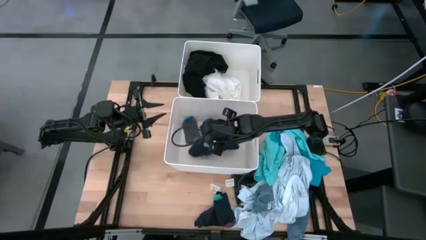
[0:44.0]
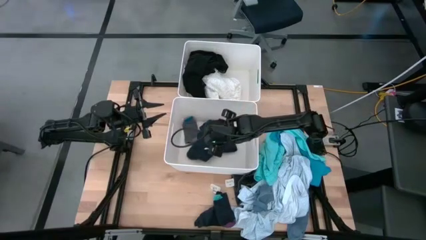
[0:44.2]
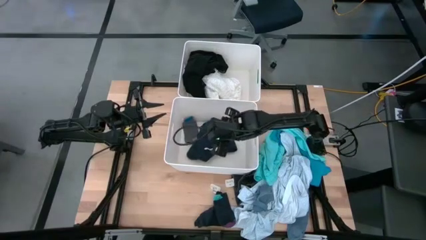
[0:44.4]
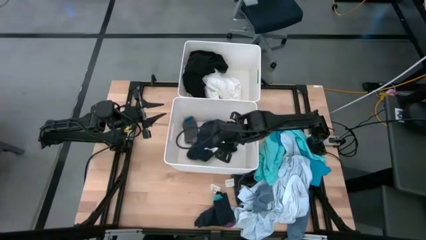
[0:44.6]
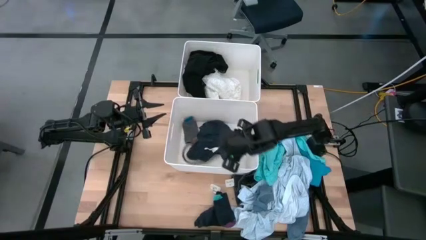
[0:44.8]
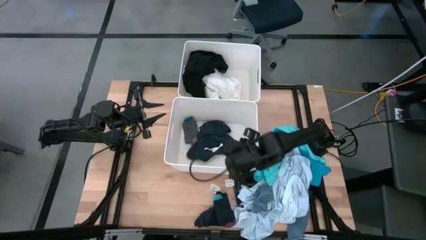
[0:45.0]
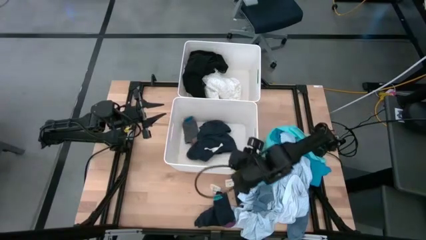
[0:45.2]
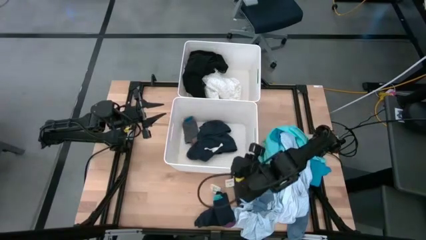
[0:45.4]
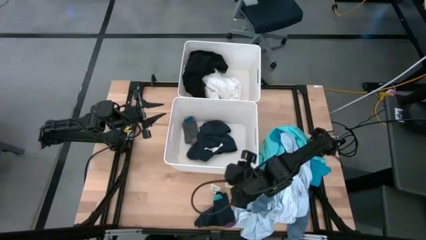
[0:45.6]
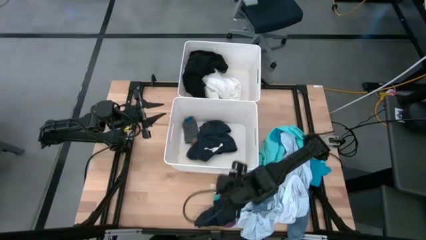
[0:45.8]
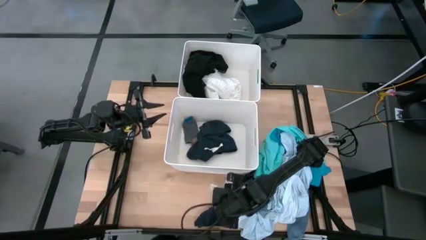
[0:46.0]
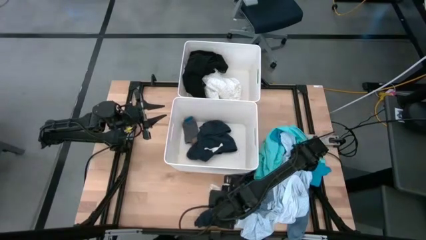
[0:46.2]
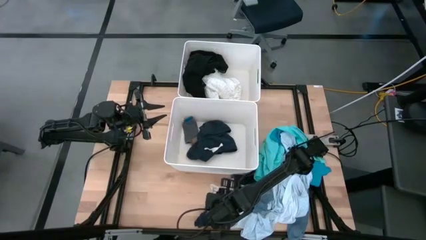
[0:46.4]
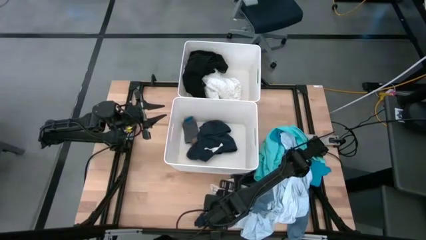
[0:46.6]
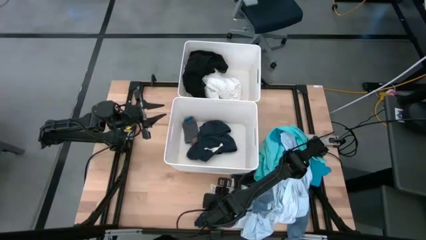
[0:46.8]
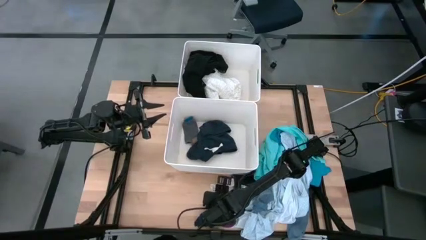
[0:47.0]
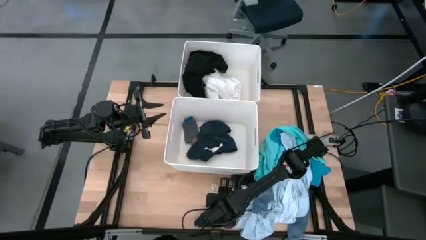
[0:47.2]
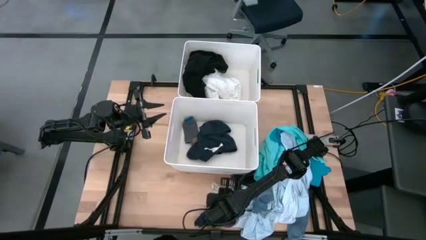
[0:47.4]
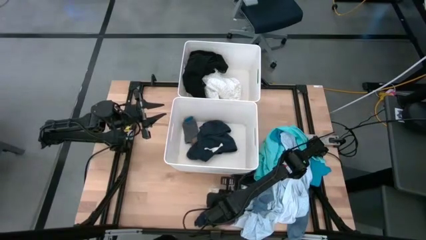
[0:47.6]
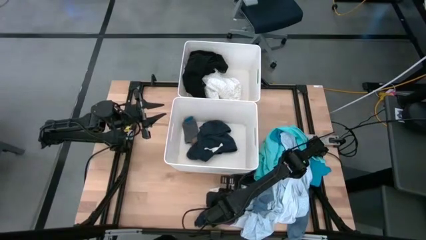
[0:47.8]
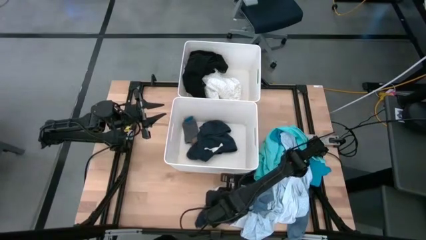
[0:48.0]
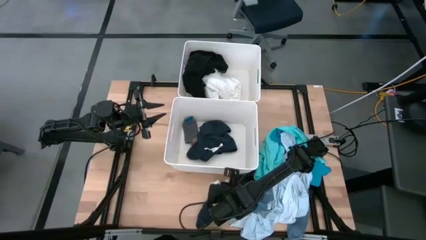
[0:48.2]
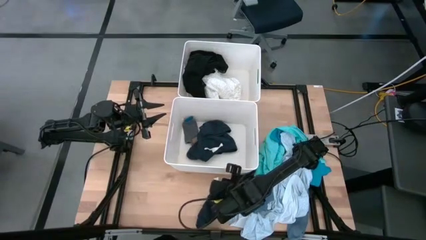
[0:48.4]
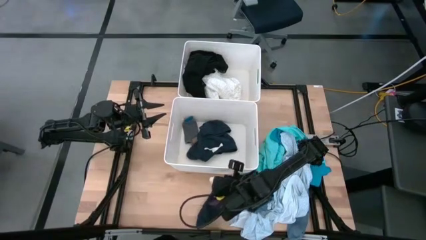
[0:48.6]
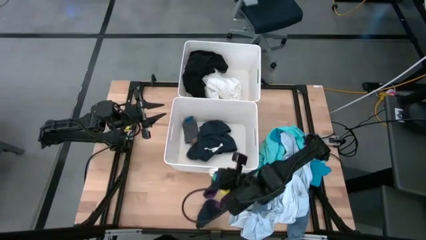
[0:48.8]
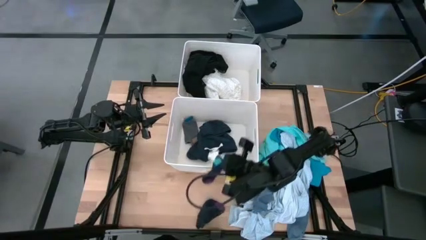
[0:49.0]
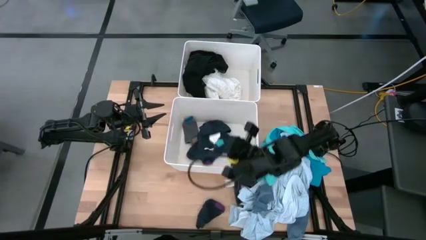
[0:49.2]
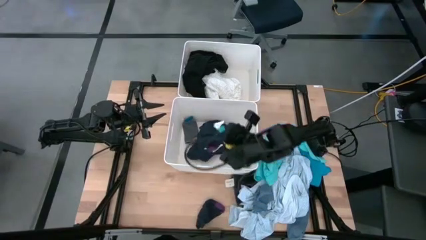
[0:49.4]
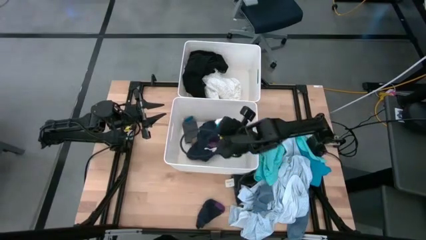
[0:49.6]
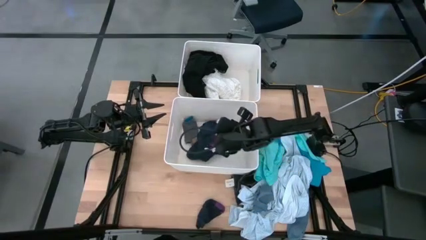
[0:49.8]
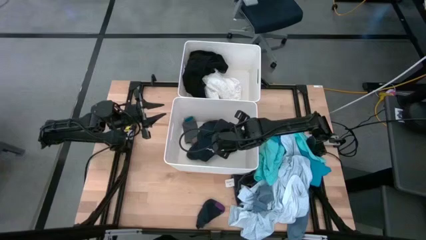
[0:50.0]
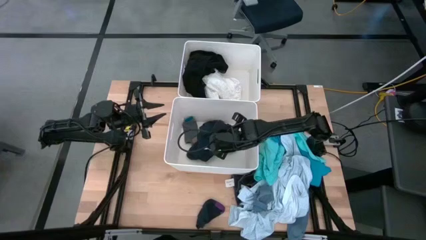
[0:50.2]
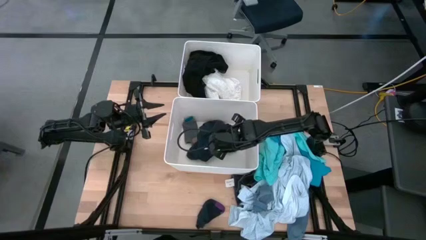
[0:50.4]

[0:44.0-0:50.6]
Task: Sort clothes
Put the right dark blue sock into the bottom white bin

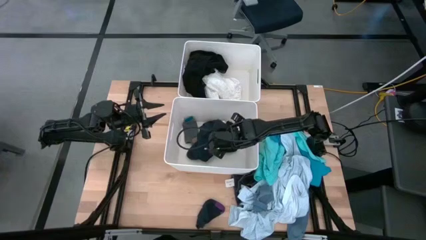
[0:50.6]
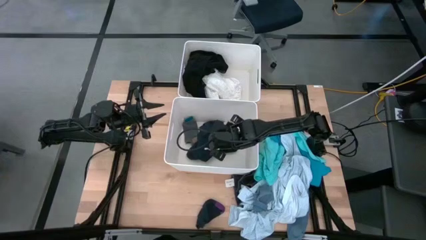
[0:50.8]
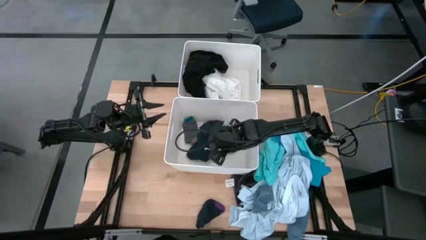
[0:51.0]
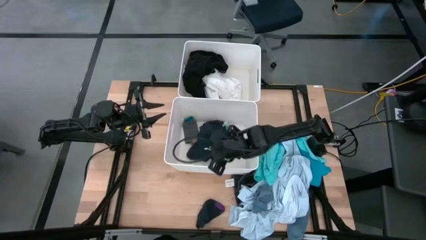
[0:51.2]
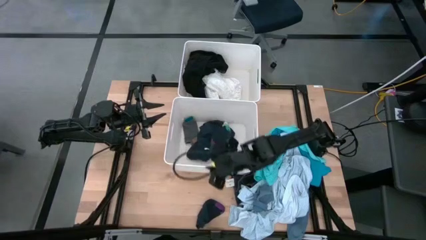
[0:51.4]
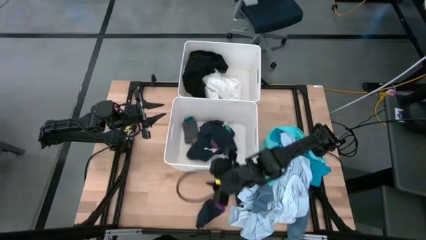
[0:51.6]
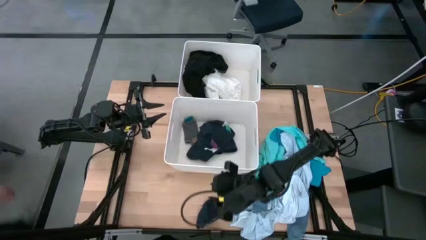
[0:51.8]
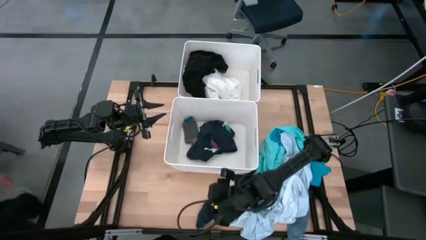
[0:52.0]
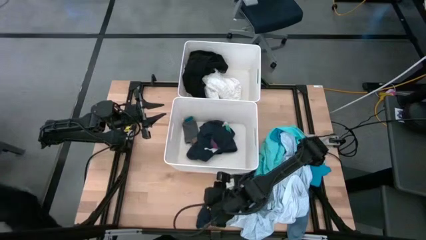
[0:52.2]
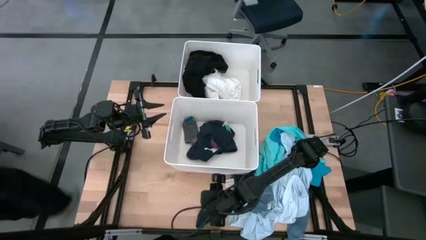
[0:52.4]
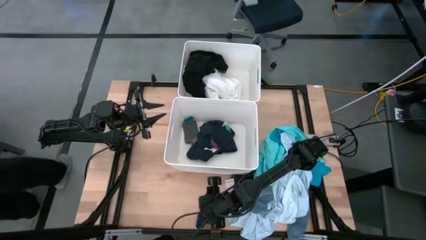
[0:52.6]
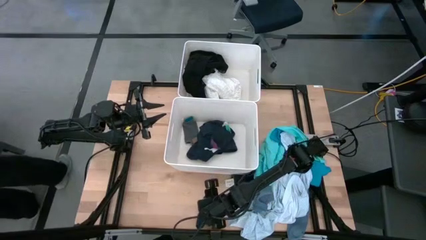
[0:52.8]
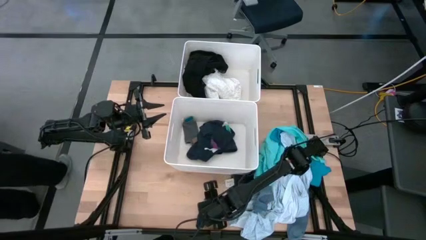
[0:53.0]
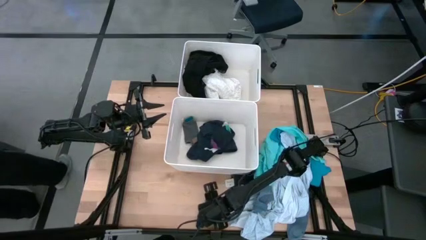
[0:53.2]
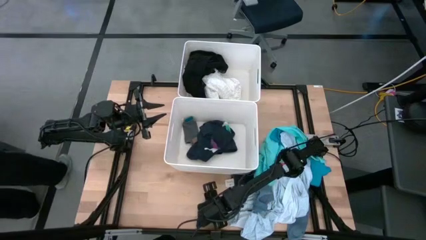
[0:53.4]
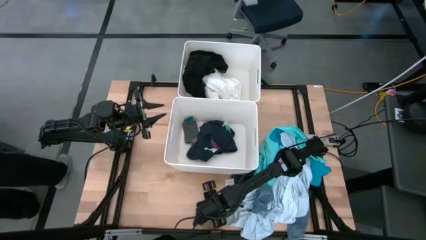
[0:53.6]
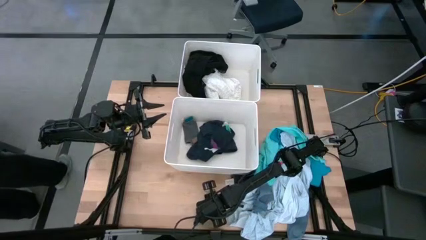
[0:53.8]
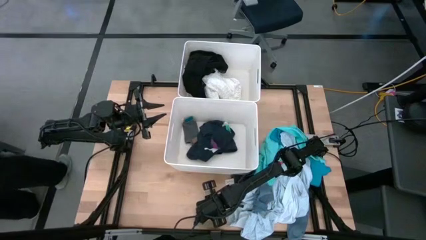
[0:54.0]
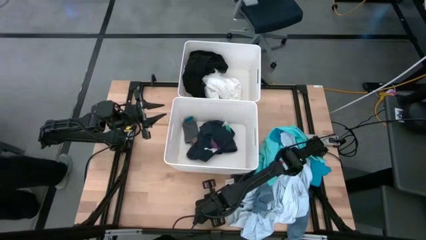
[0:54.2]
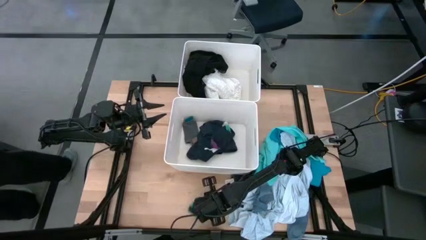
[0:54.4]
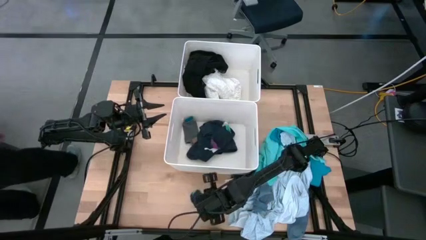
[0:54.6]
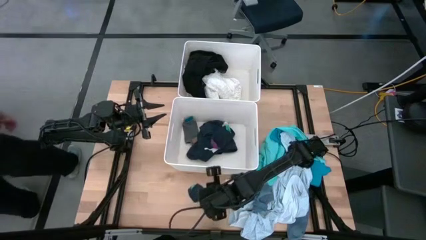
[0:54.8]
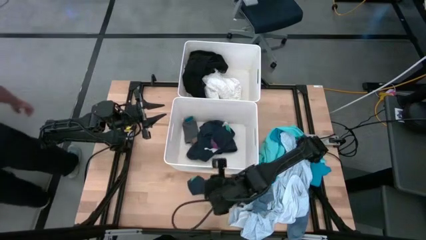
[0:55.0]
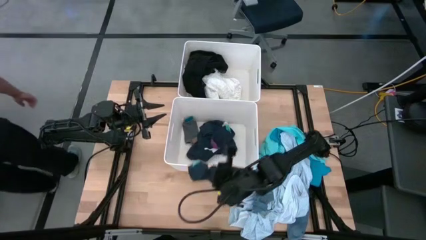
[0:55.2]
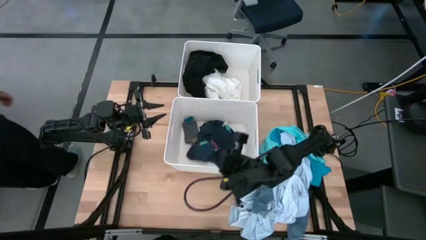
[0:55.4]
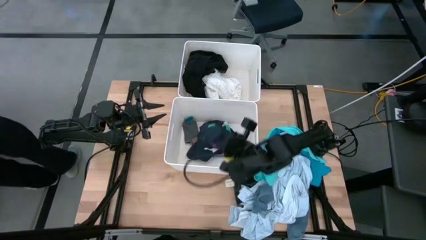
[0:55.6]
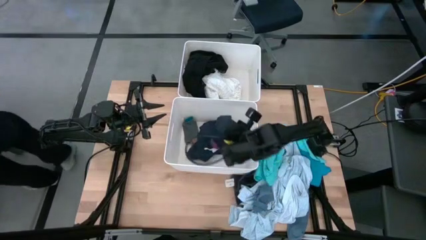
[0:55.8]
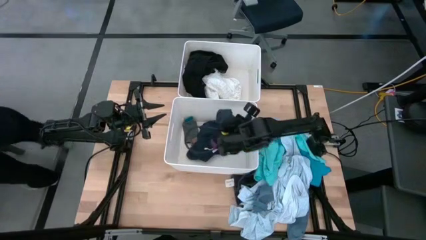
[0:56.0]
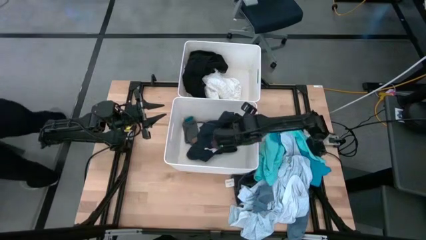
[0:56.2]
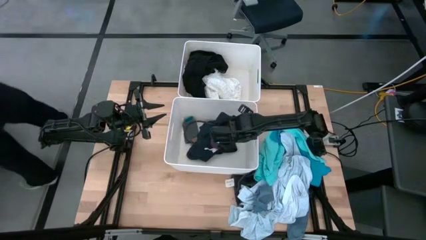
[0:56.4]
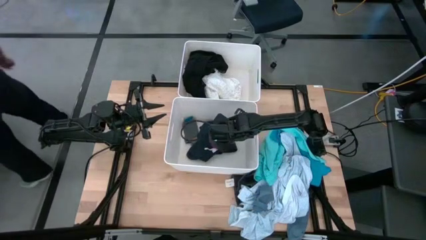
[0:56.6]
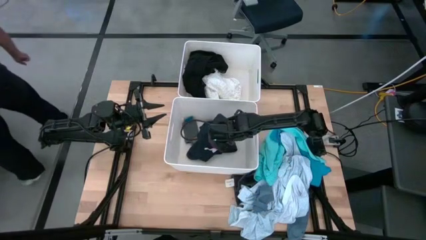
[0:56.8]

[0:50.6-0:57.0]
Put the dark blue sock into the bottom white bin
